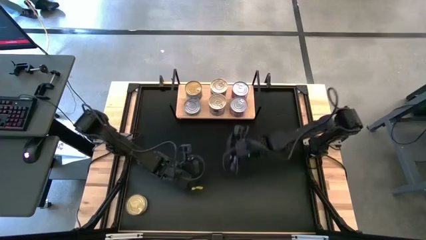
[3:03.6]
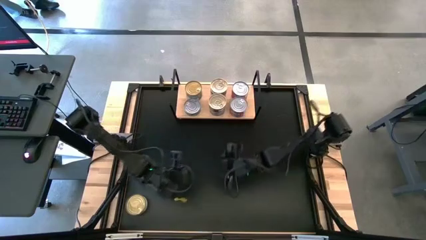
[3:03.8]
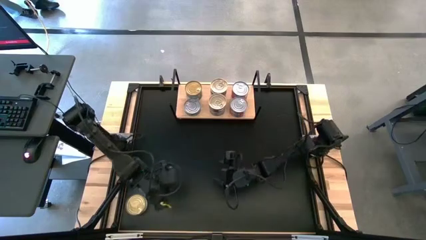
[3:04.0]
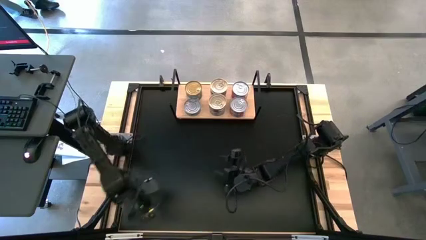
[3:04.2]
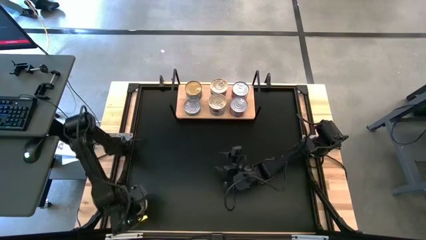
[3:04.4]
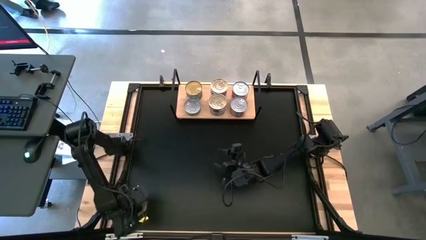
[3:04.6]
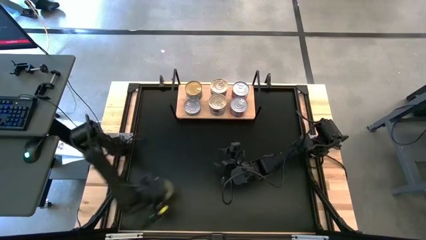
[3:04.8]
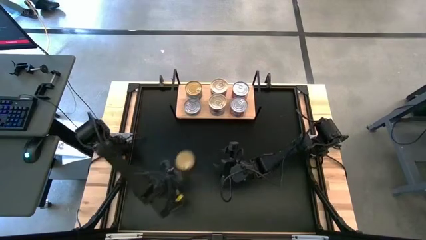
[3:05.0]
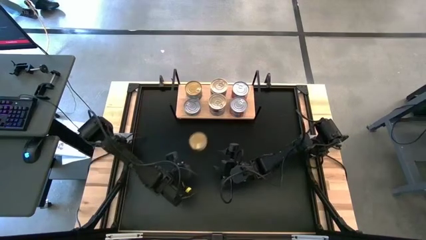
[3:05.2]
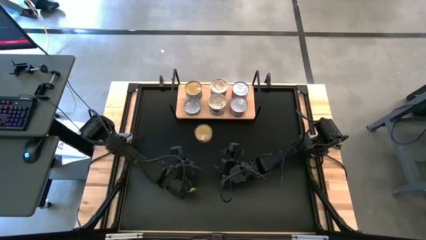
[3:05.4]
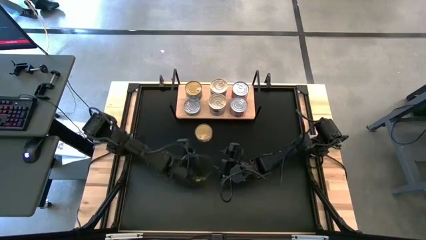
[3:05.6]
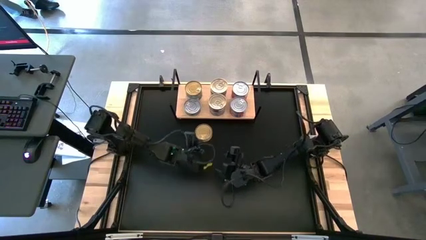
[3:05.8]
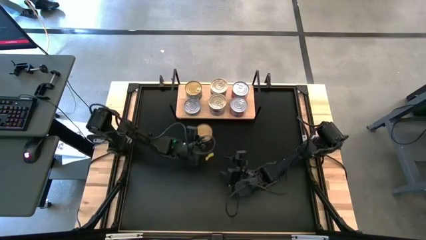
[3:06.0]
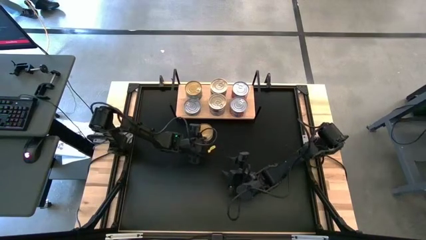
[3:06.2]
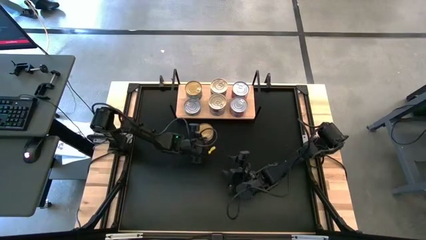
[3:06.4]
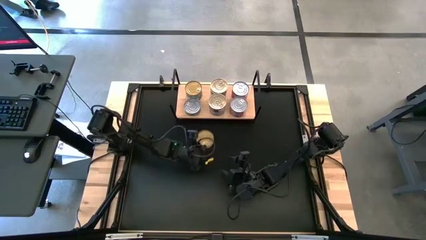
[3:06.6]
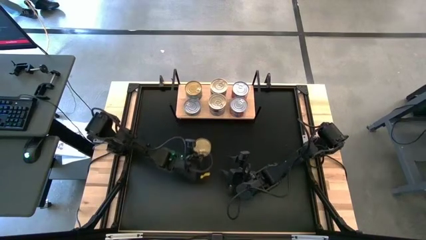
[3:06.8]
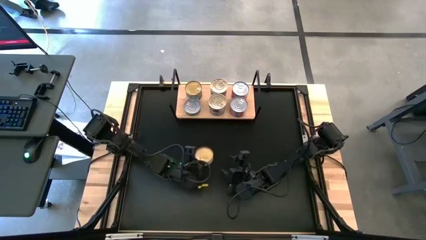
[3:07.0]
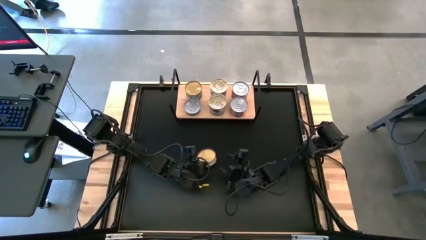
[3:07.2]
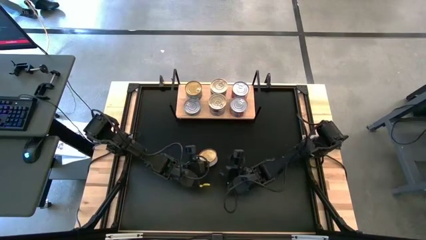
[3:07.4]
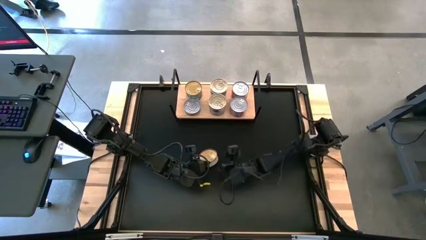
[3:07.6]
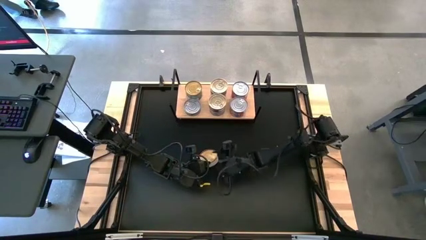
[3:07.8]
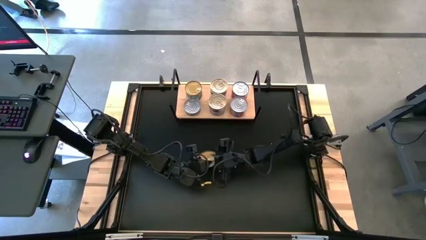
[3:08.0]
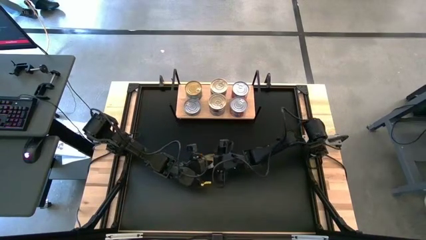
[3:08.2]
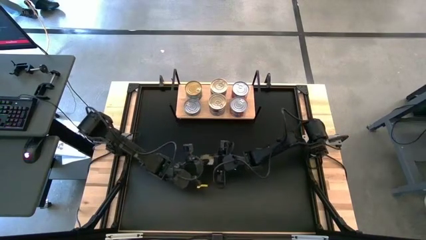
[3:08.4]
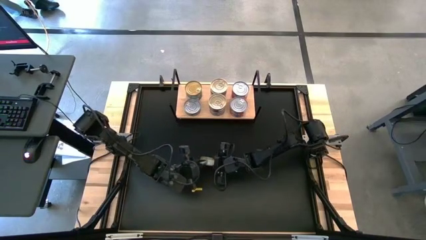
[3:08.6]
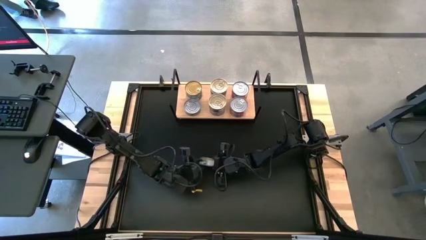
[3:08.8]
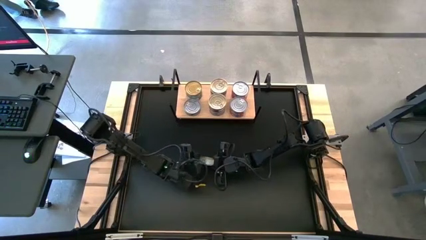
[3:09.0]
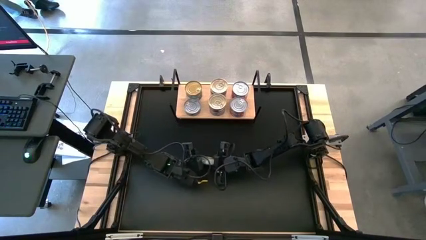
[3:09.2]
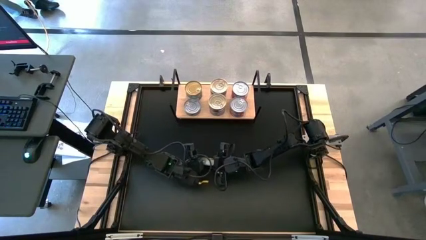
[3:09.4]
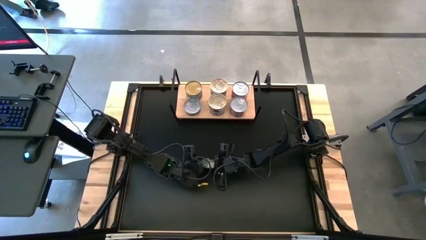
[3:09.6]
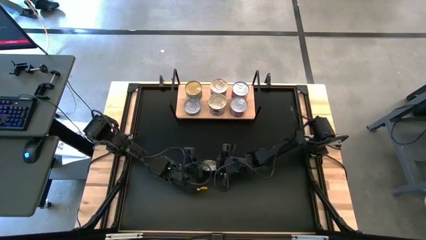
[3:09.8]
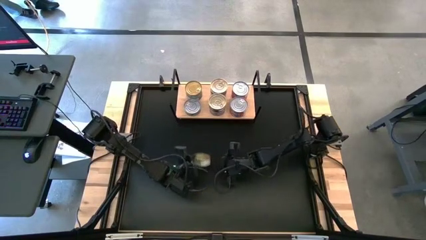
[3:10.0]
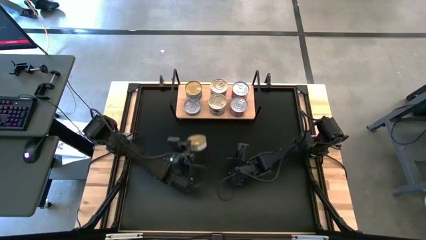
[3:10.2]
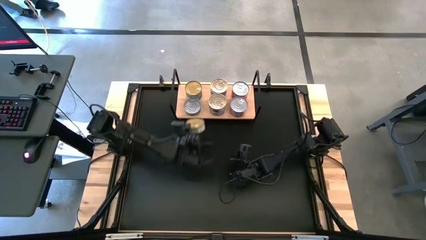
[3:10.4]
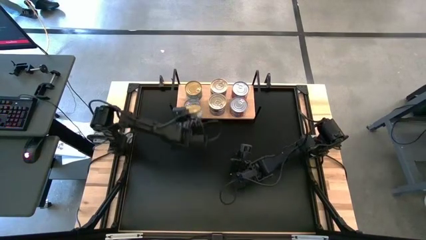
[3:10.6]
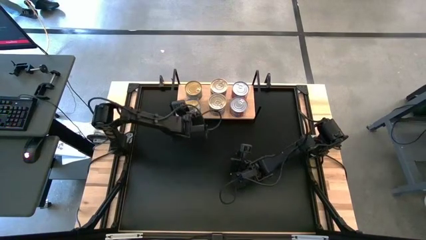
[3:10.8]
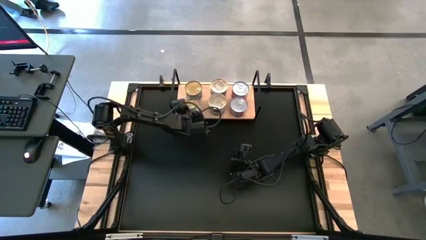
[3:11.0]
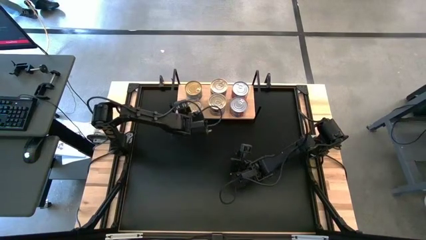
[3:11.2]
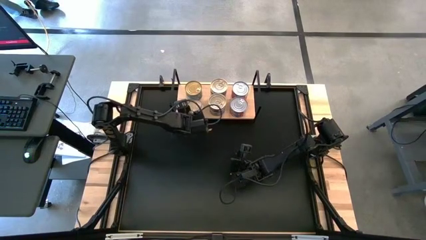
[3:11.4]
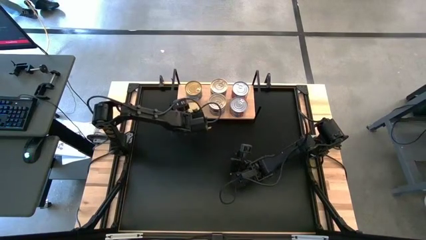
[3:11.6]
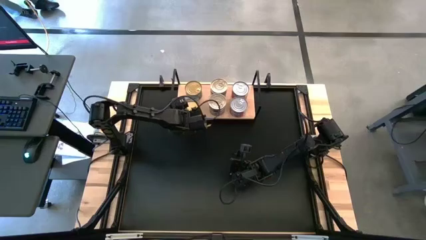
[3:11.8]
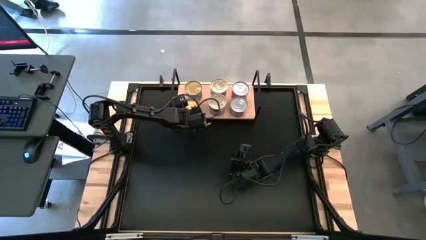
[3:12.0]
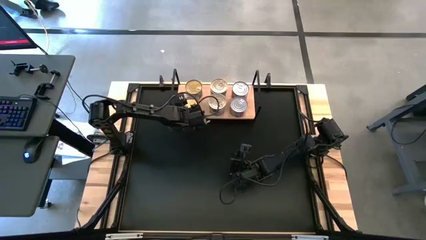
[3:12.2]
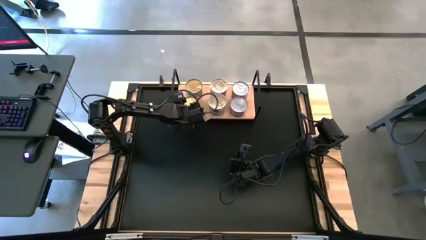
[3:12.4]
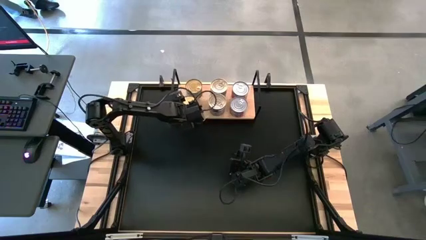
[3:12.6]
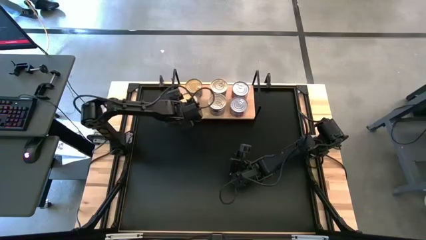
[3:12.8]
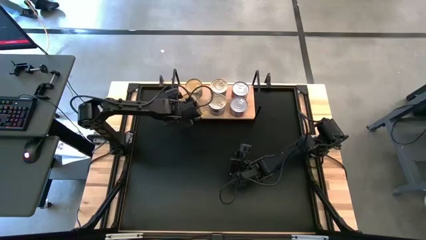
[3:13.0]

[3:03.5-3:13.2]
Task: Stack canned seafood by type on shelf
Stack the green tuna can on top of the green tuna can on the shelf

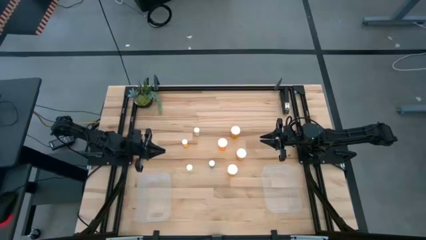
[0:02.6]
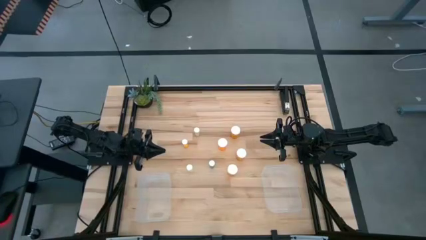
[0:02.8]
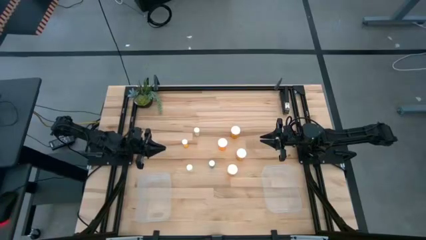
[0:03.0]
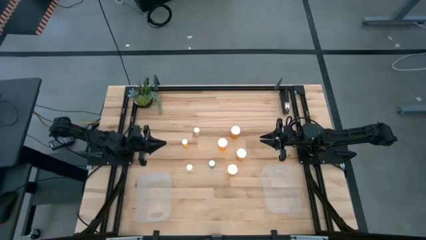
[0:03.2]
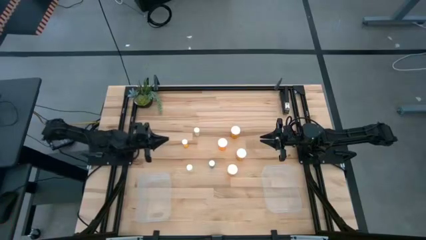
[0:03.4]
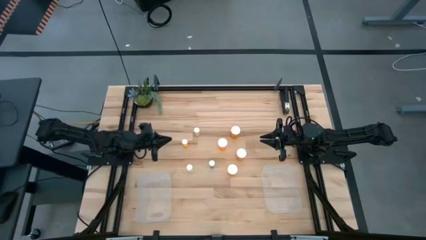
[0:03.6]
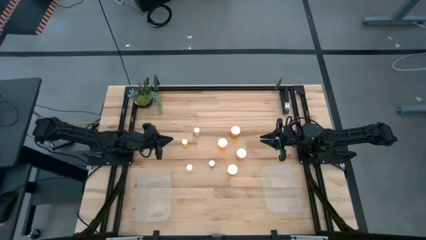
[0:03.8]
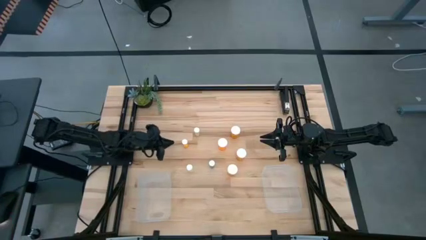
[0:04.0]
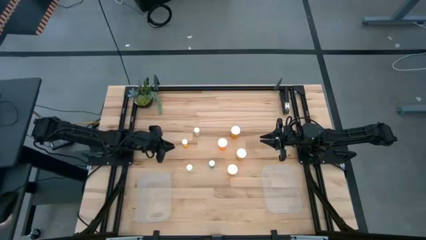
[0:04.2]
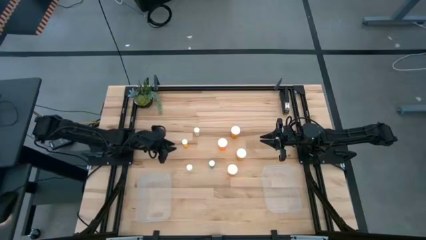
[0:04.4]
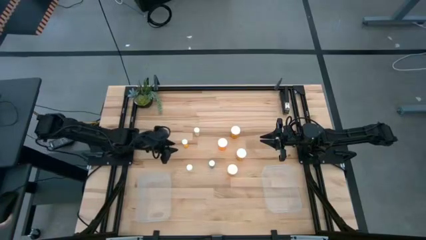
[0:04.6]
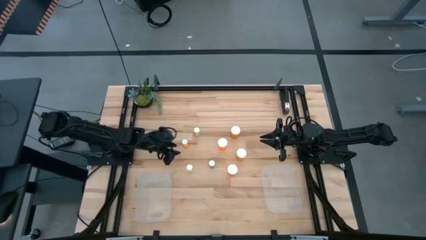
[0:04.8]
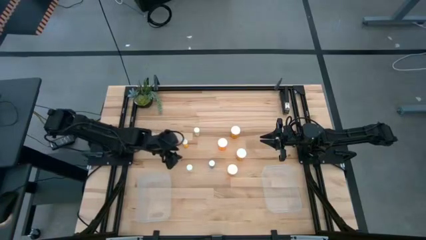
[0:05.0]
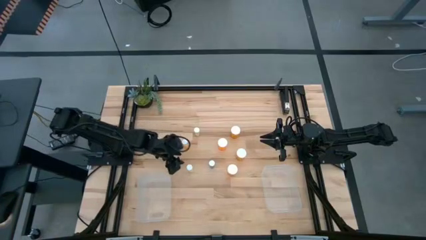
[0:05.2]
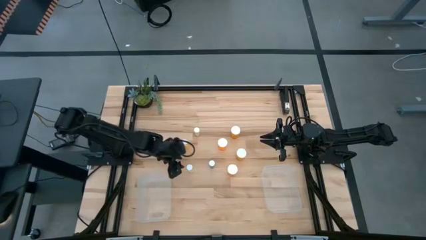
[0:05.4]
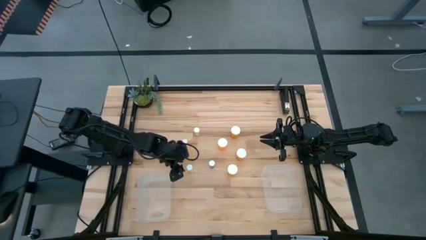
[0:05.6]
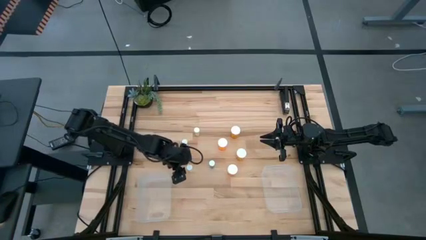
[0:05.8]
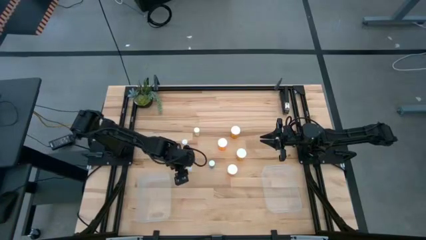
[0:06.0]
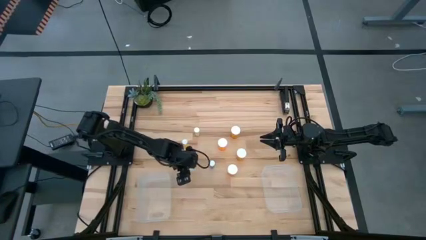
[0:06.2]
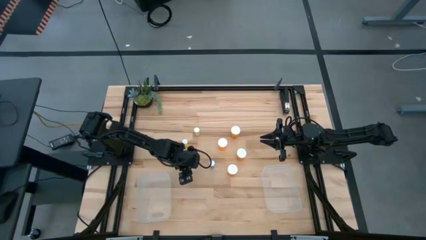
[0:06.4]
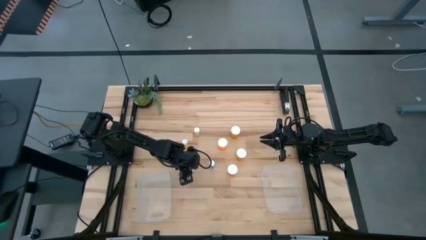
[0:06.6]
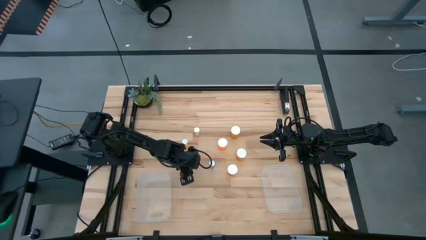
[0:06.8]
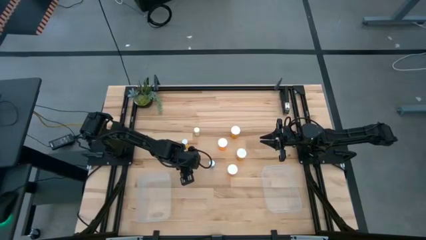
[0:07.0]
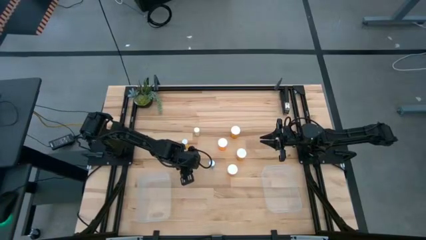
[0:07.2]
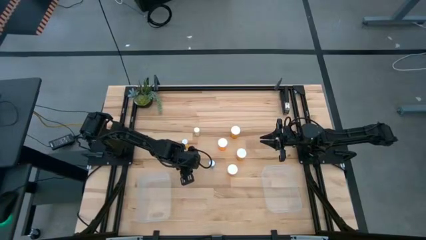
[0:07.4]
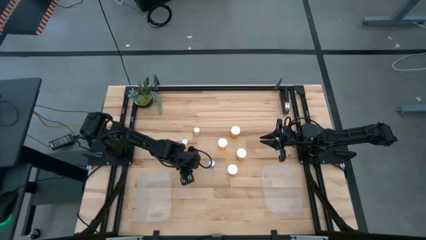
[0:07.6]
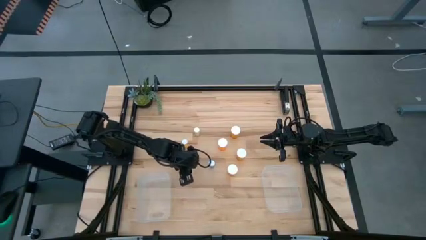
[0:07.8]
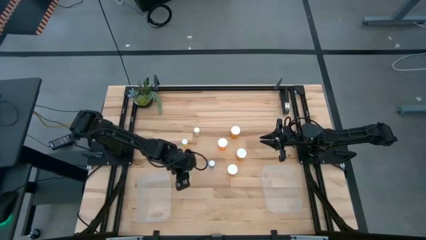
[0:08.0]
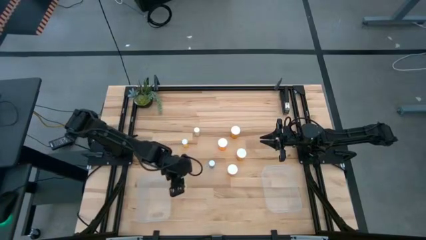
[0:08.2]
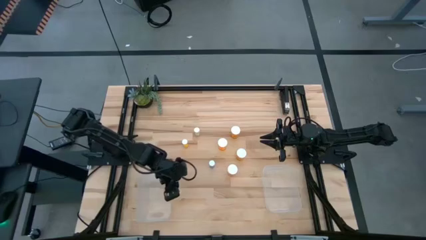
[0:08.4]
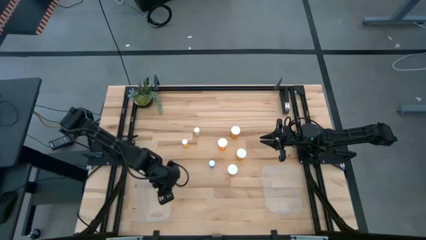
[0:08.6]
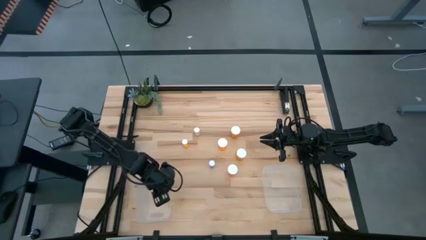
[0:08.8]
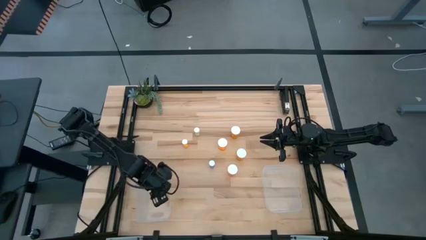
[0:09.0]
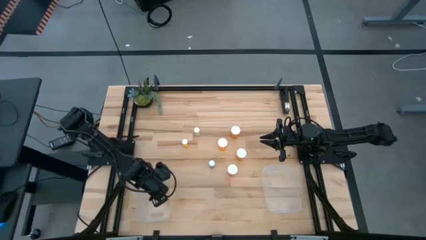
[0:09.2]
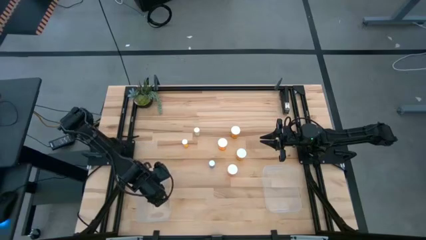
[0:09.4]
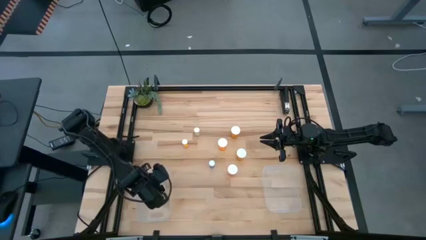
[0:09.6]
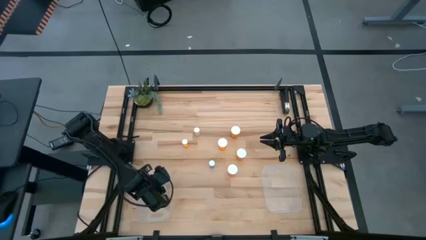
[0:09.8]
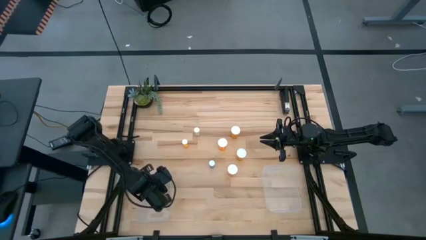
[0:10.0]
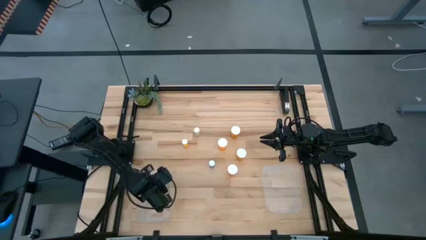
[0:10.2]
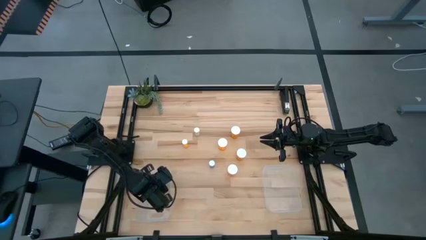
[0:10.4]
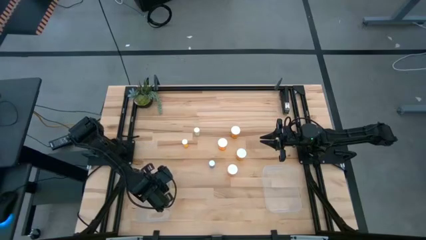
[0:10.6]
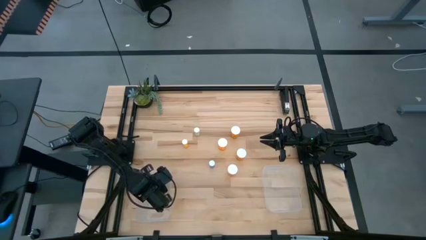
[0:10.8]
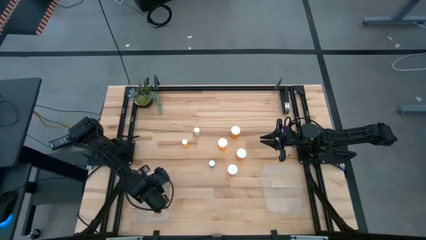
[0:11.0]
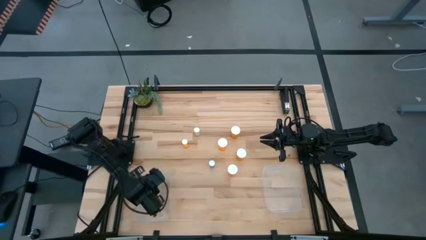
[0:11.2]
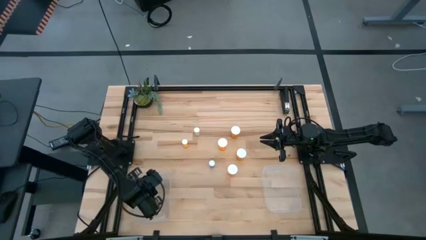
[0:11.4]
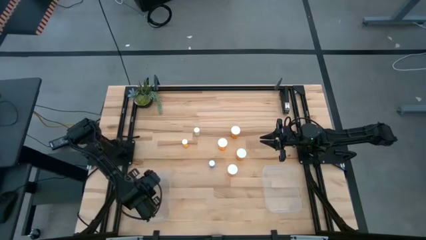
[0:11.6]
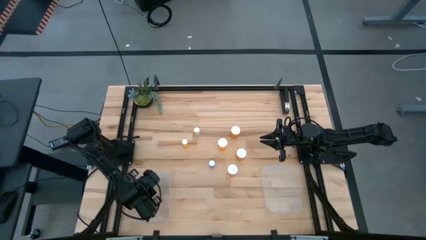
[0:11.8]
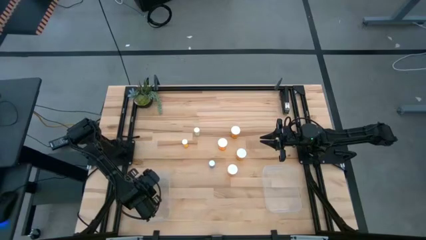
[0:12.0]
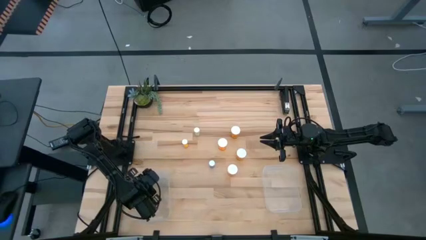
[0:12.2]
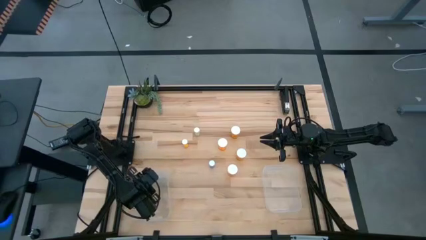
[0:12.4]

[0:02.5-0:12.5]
Task: Pick and place medicine bottles into bin by pill shape (circle, oval)
Put the small yellow pill bottle into the left transparent bin
